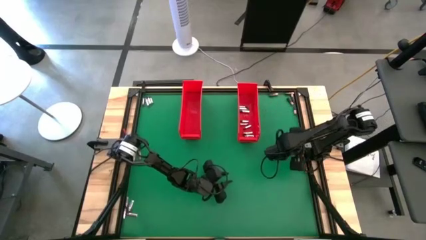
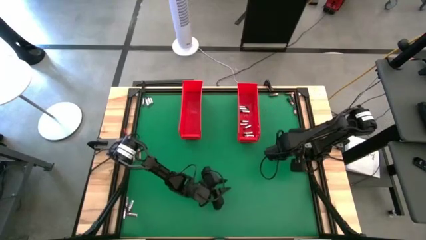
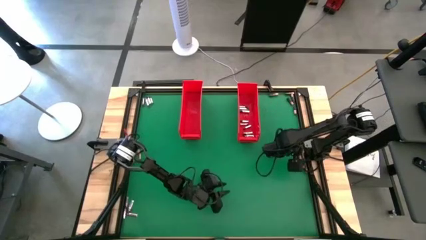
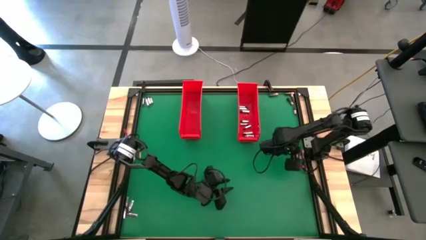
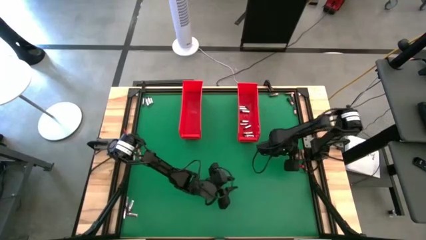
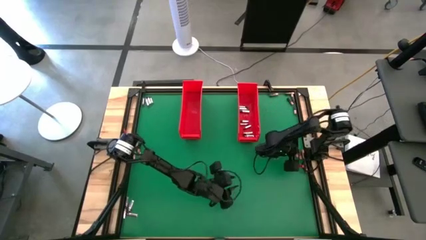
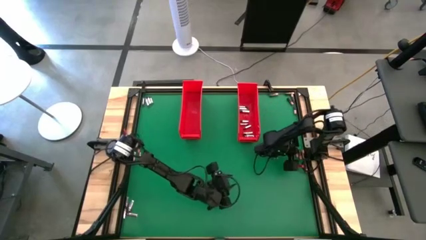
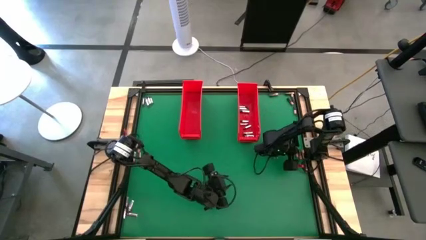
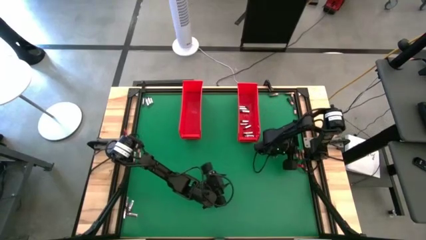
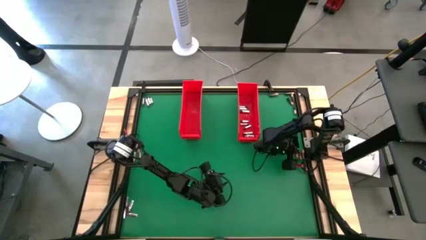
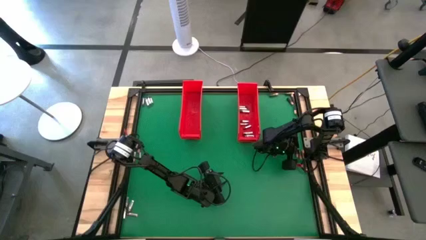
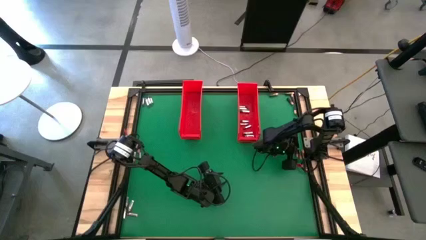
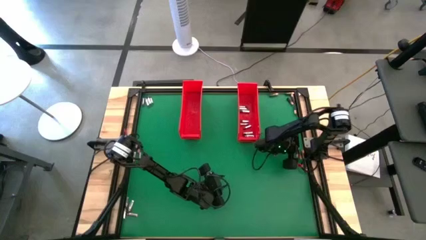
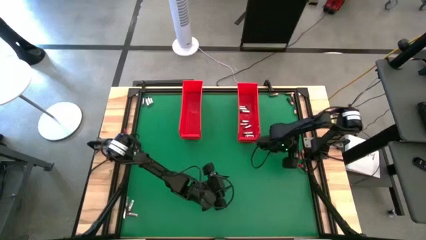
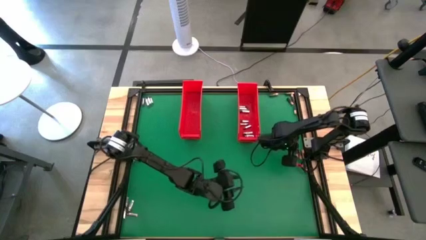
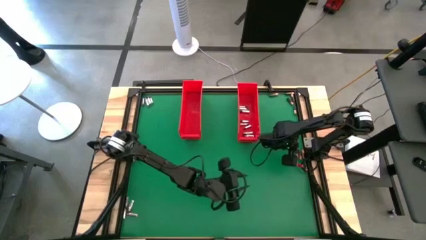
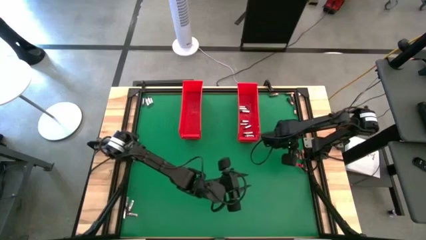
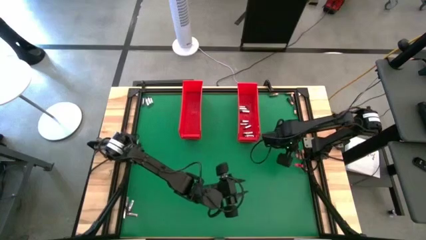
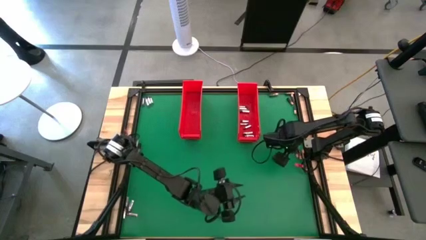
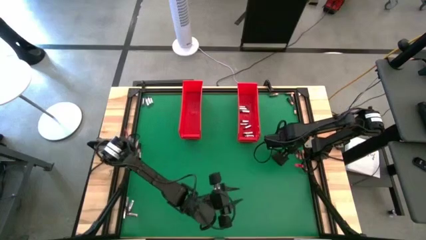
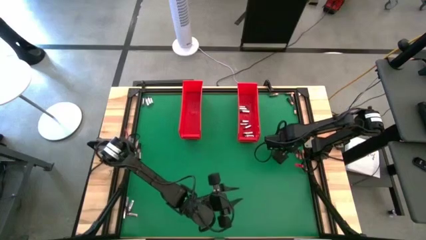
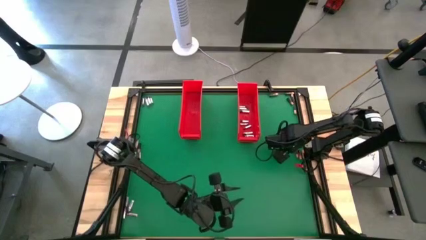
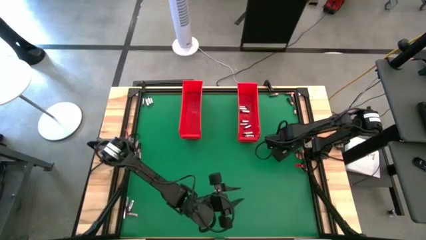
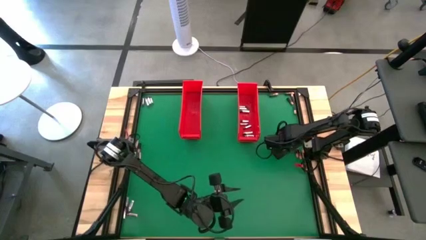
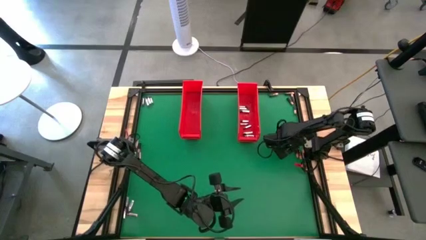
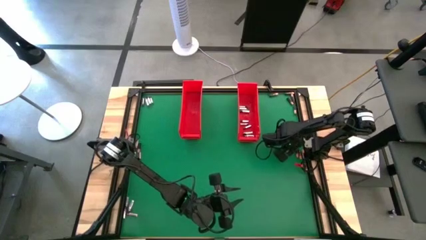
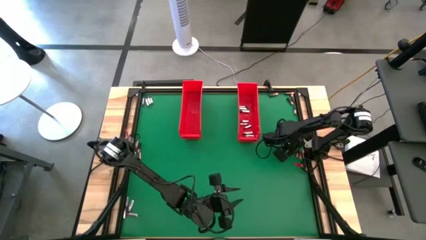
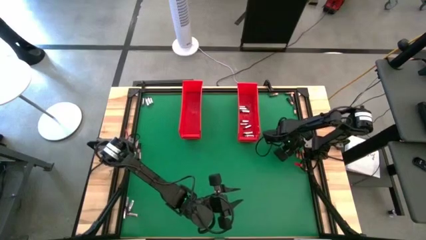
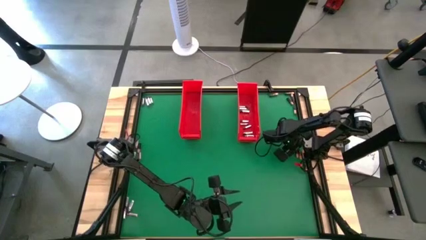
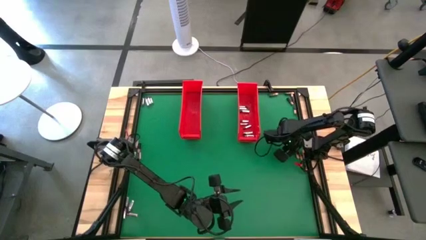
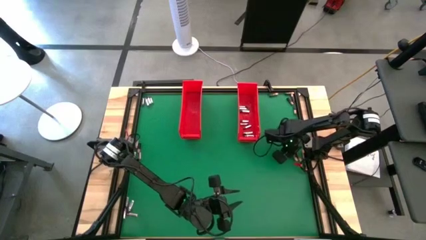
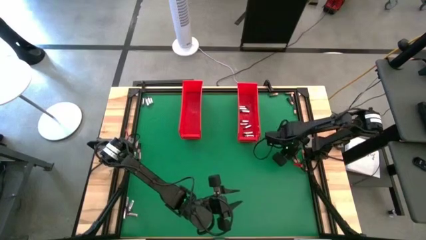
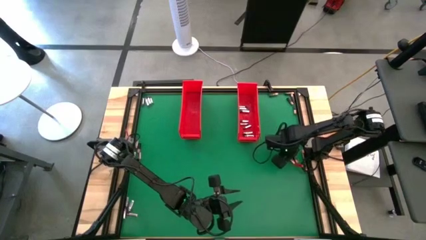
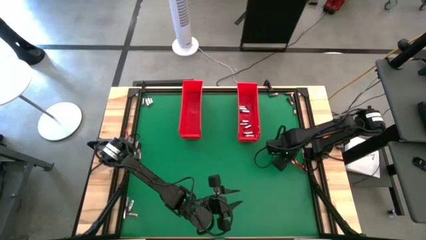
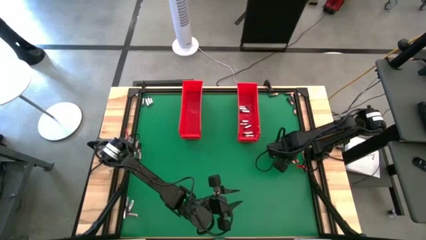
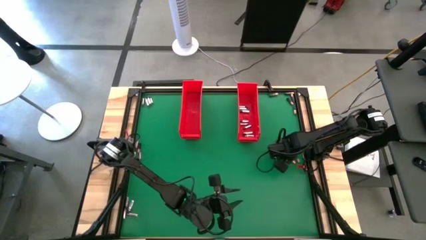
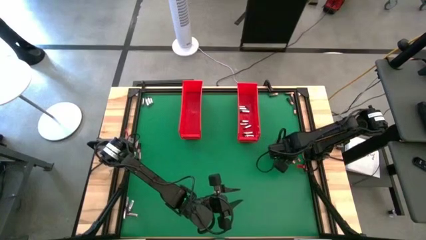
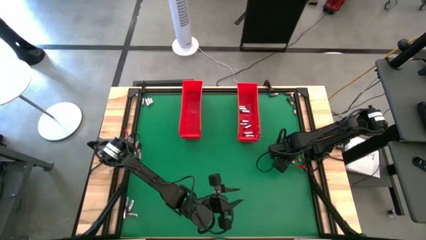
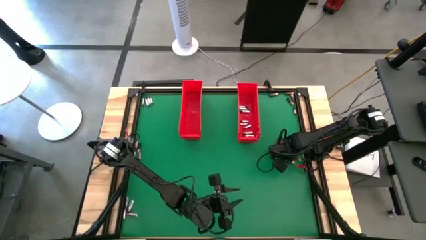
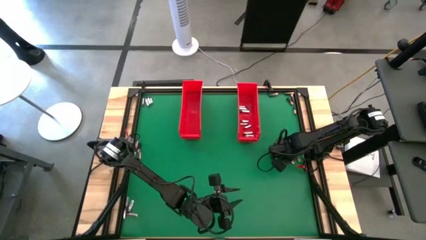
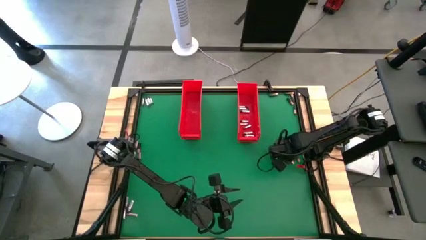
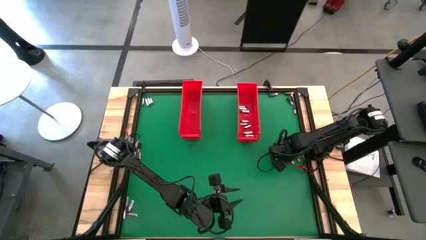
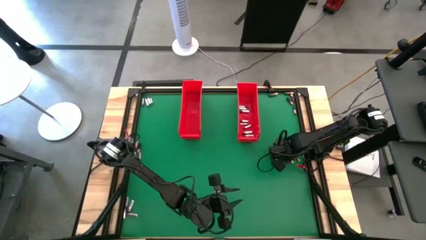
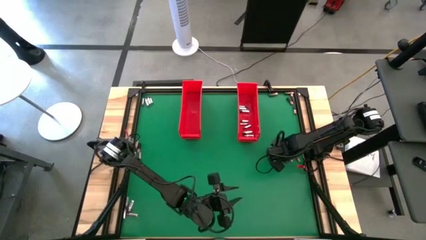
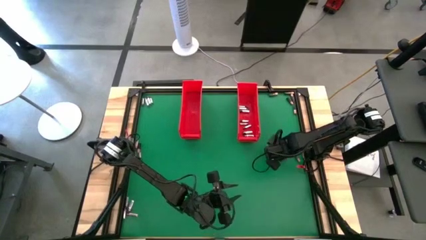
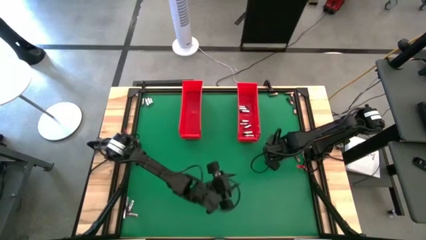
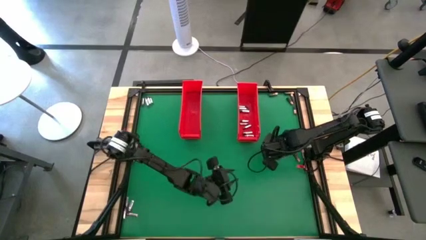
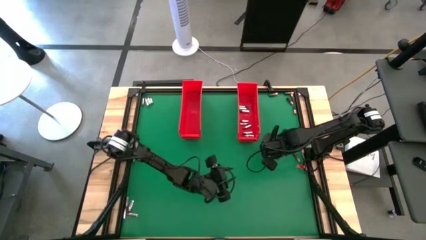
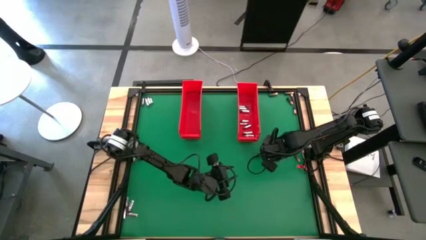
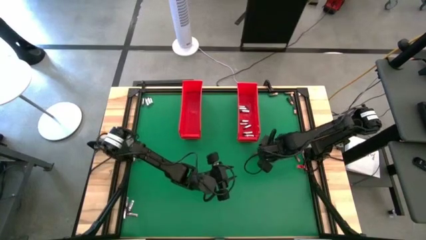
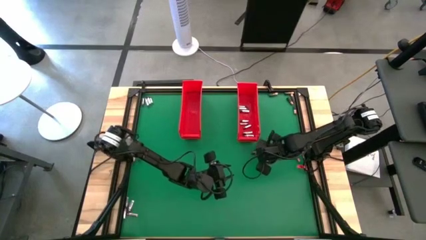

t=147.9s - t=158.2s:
Task: Sort batteries
Put the brown battery into the left red bin

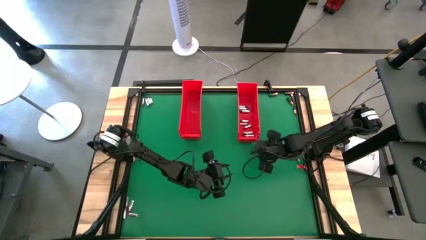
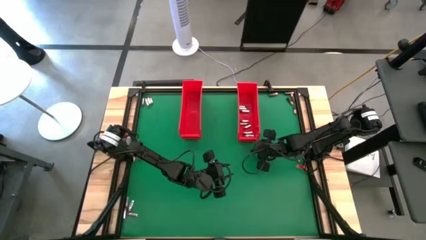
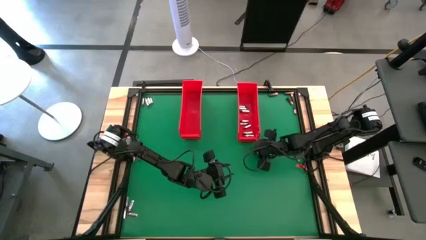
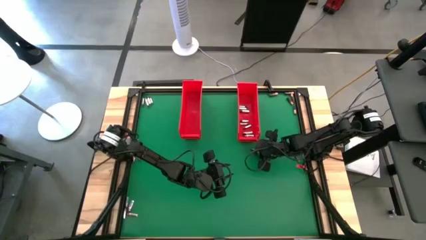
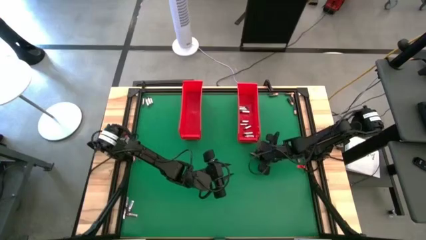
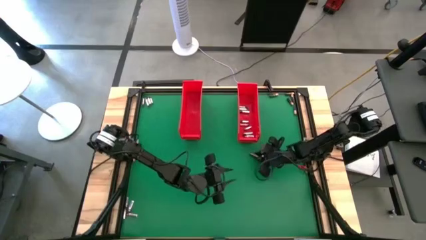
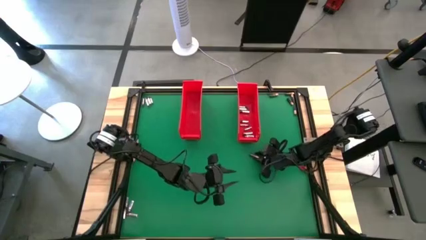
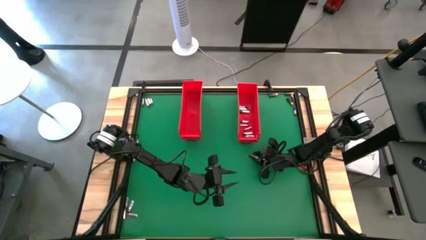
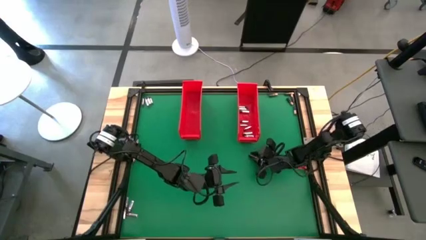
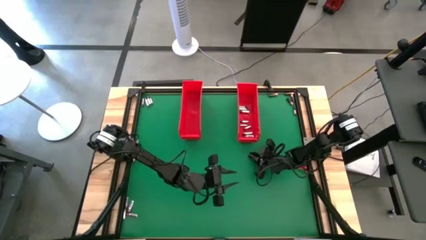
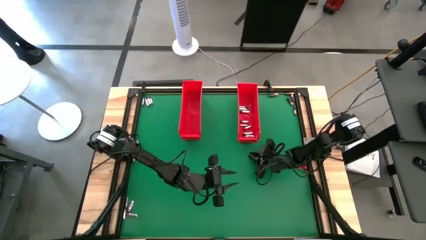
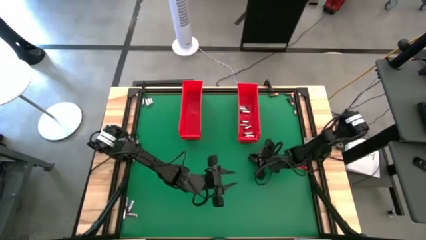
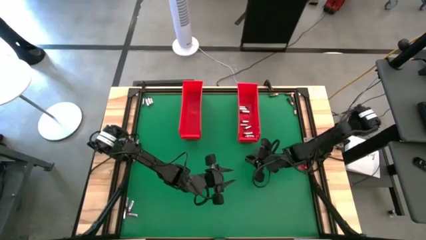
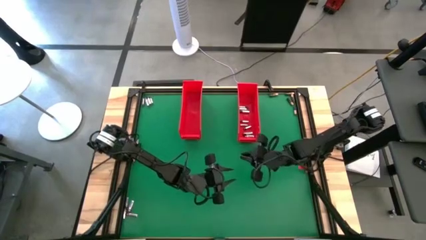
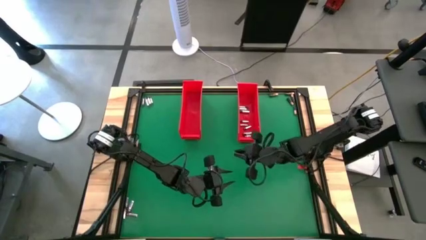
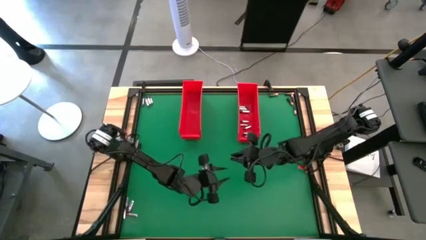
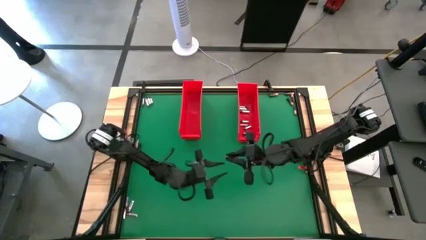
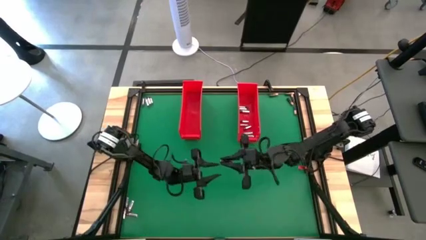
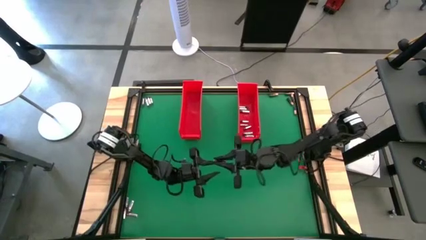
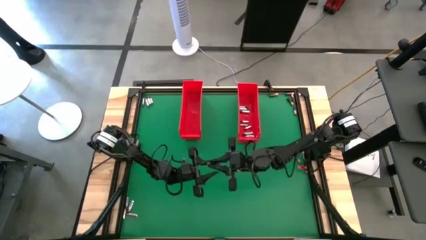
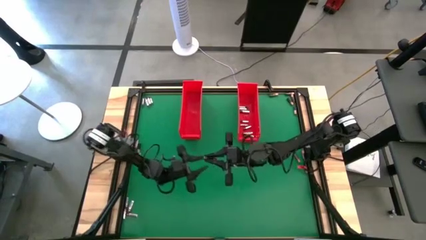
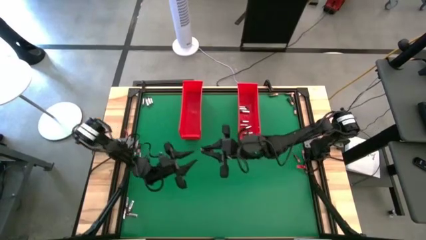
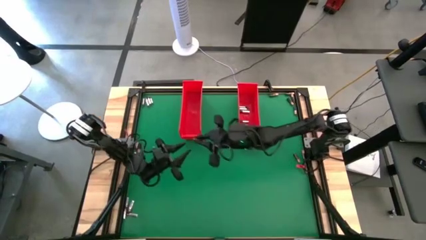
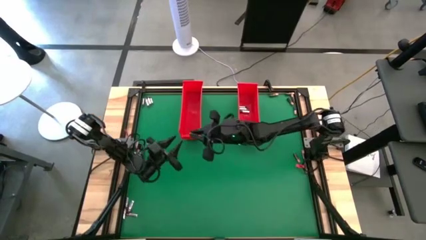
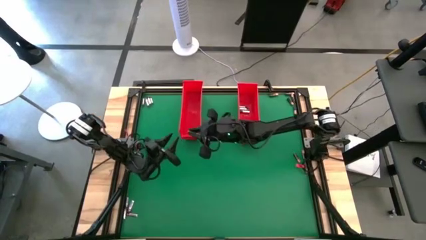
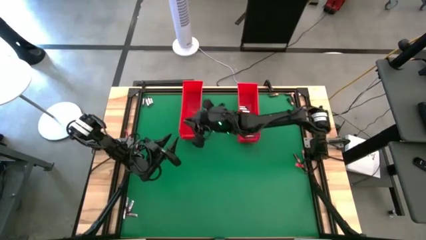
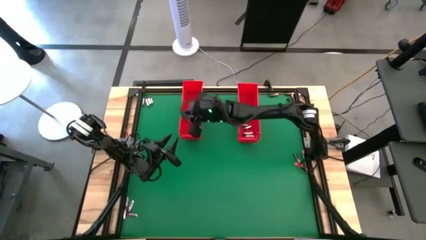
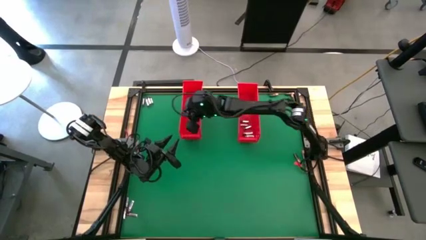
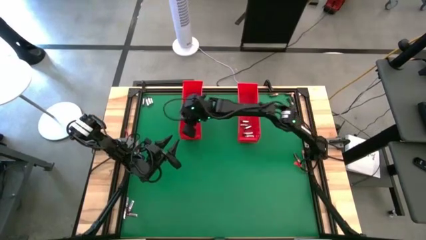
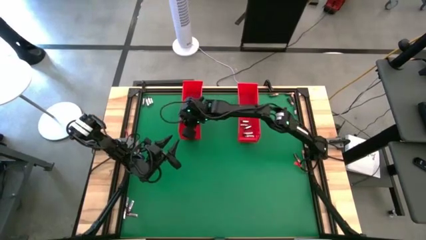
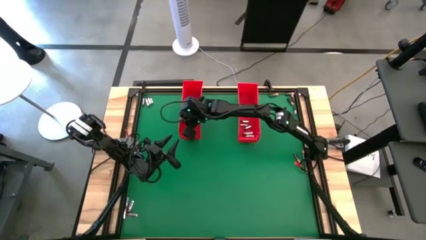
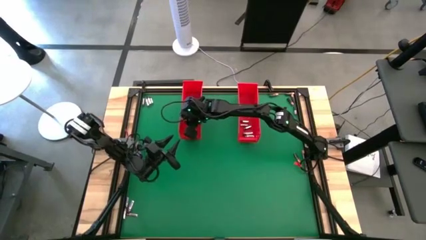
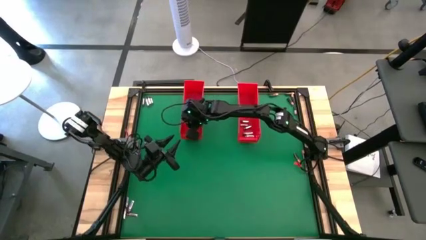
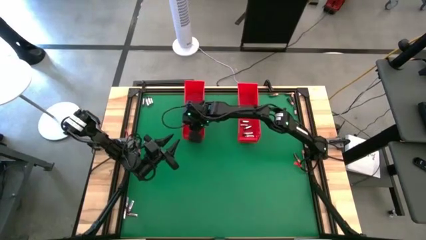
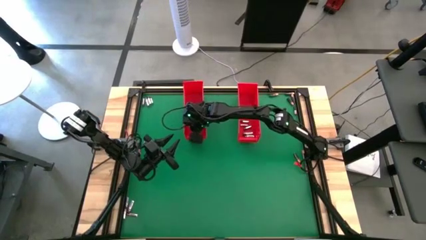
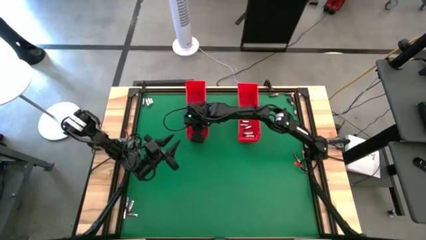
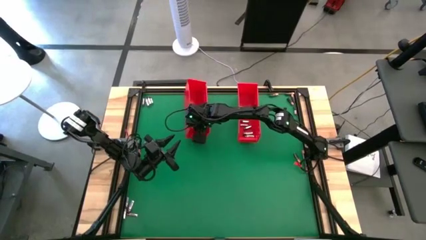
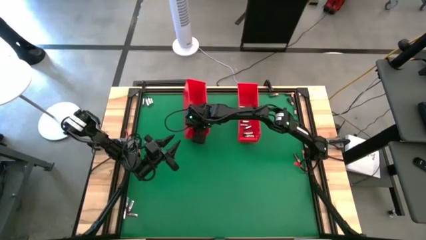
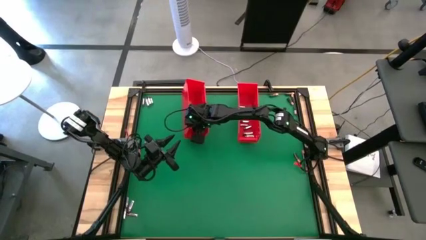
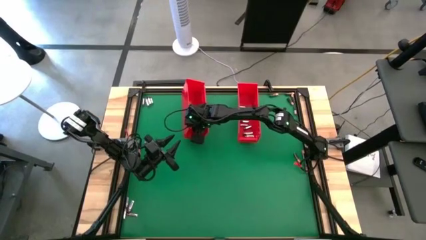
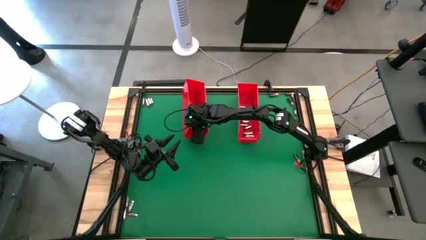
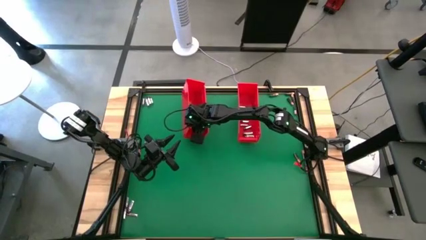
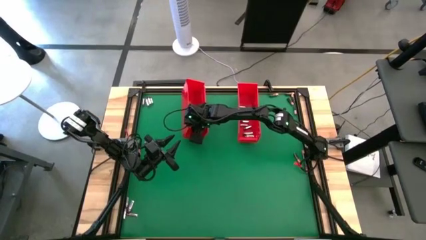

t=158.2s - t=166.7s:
Put the brown battery into the left red bin
